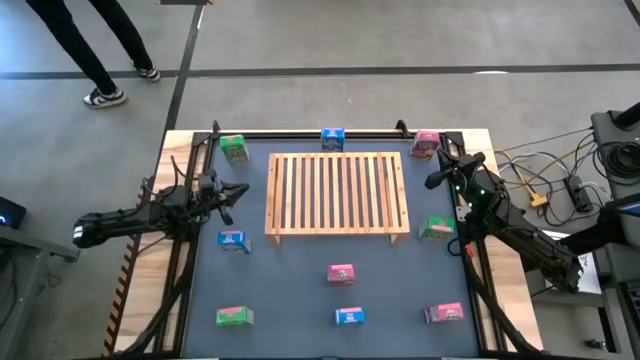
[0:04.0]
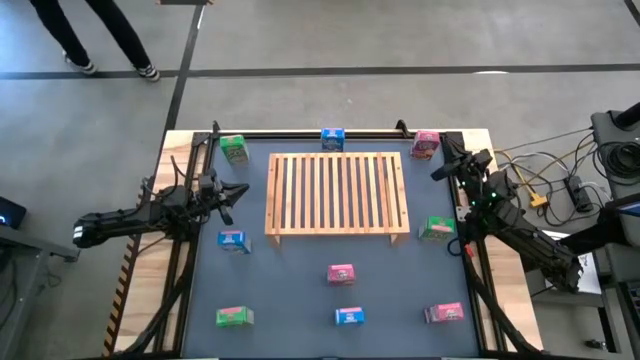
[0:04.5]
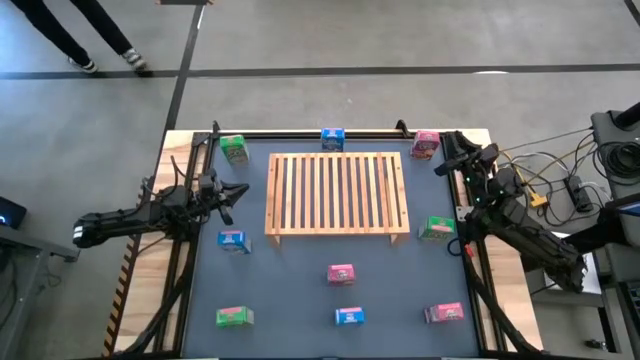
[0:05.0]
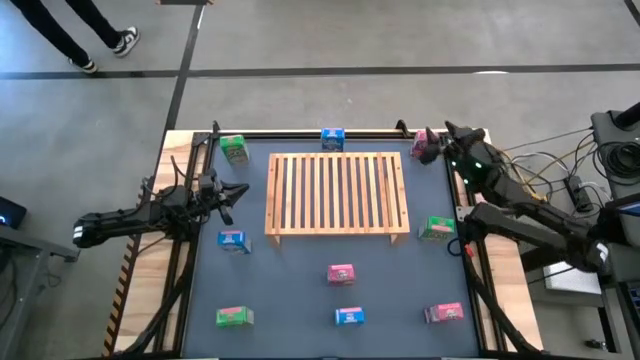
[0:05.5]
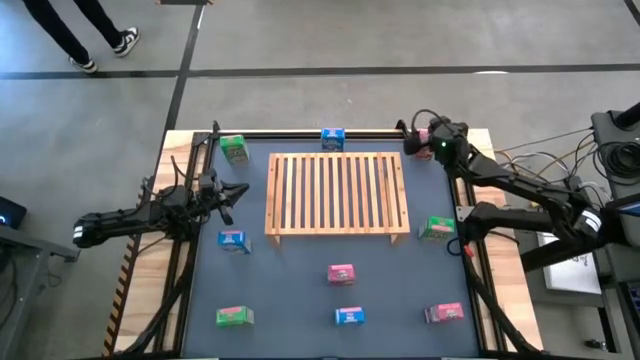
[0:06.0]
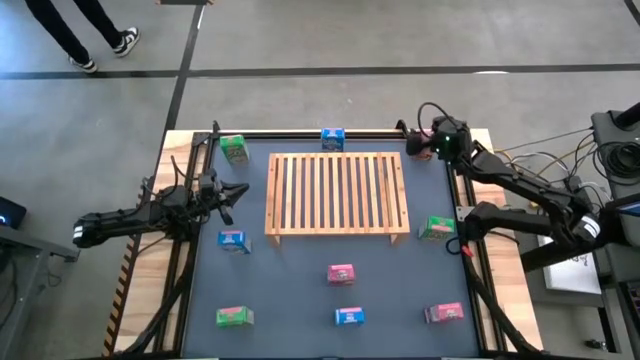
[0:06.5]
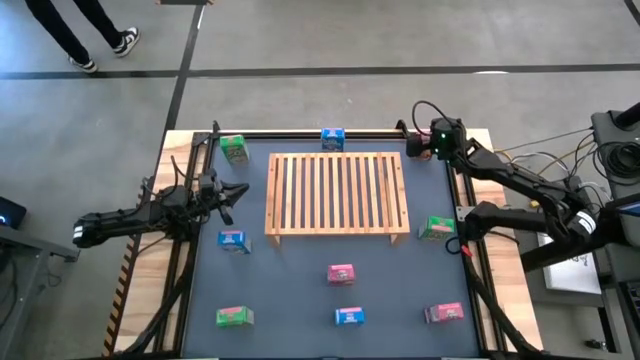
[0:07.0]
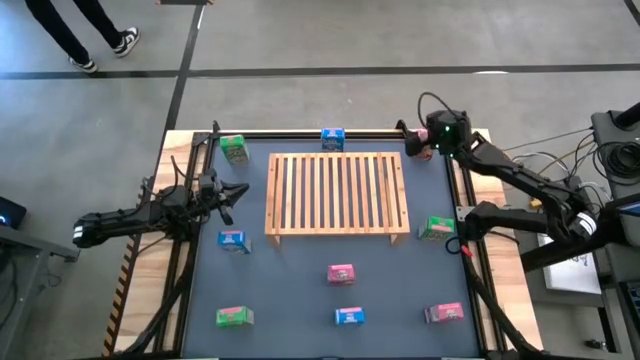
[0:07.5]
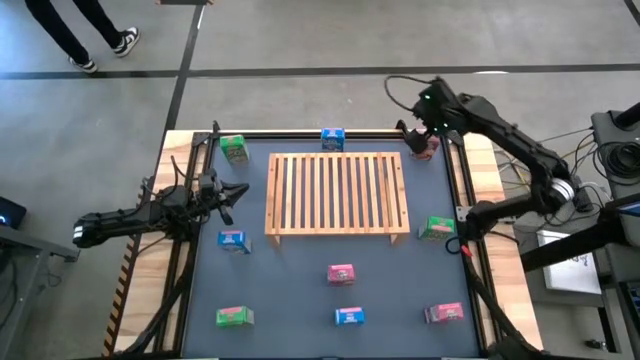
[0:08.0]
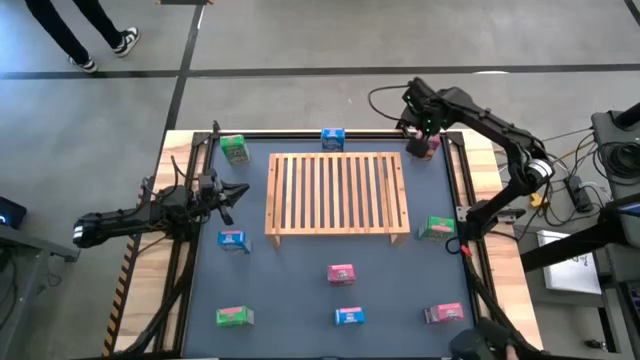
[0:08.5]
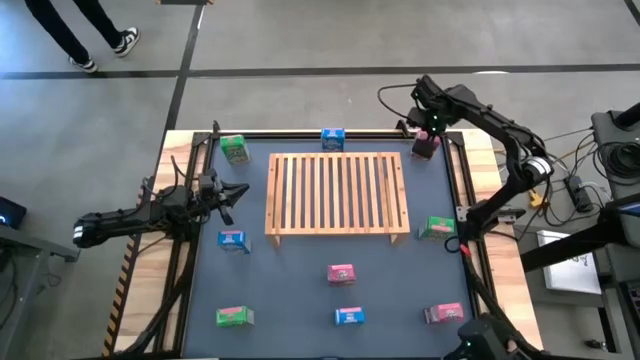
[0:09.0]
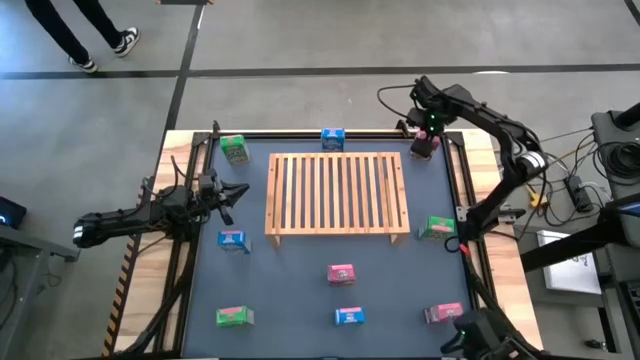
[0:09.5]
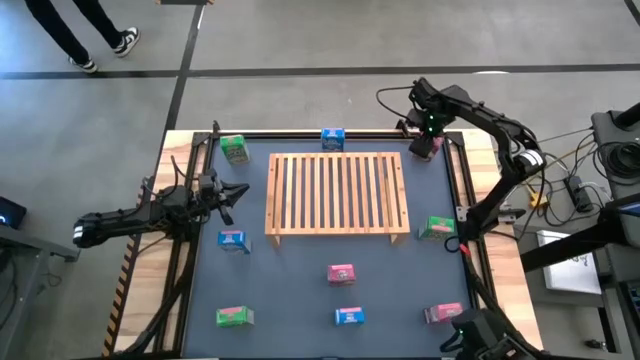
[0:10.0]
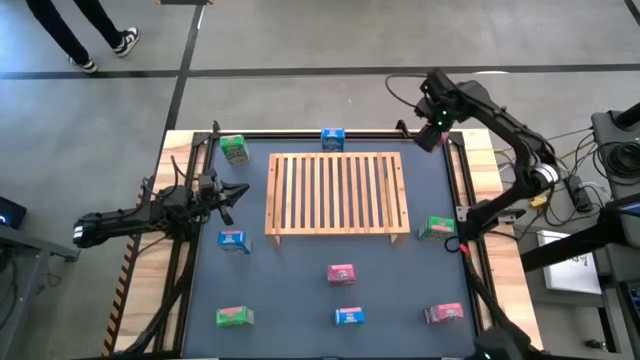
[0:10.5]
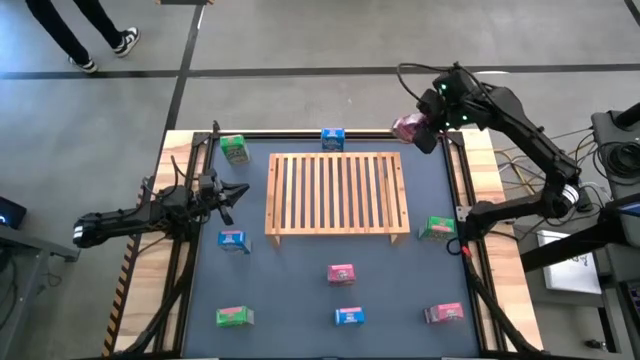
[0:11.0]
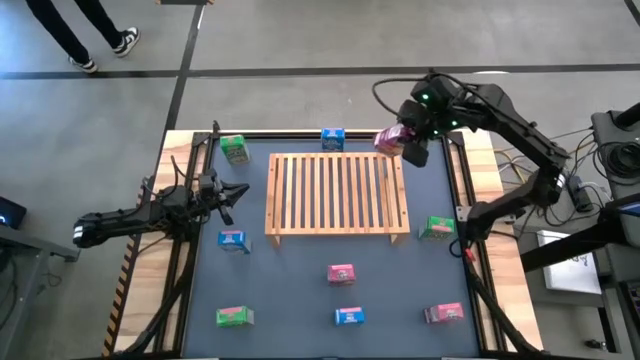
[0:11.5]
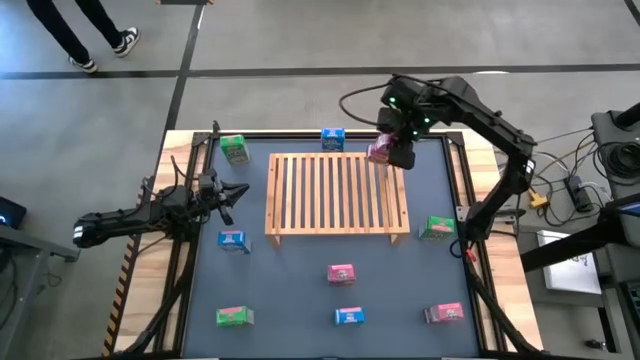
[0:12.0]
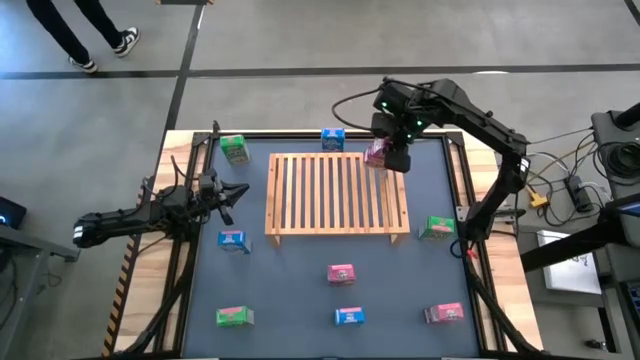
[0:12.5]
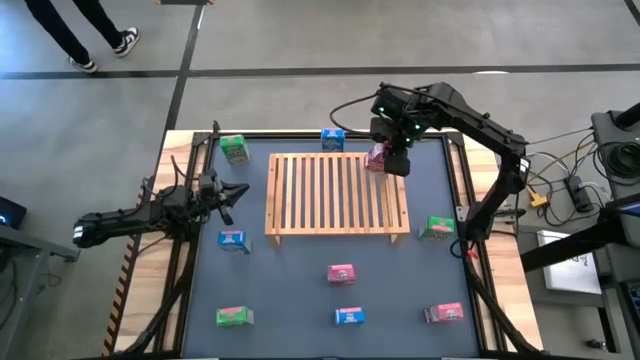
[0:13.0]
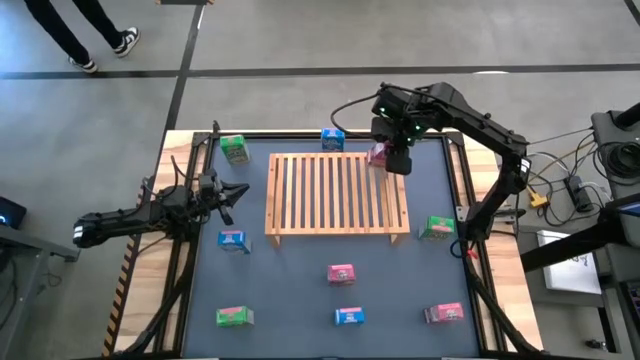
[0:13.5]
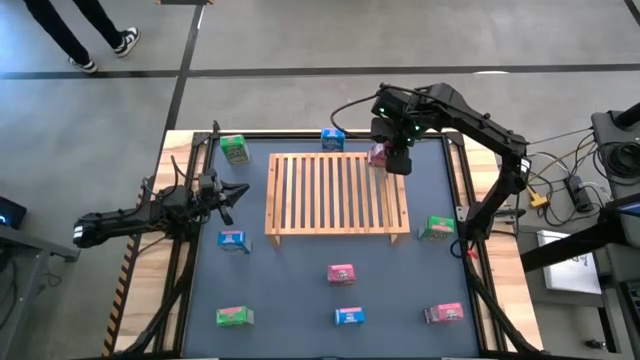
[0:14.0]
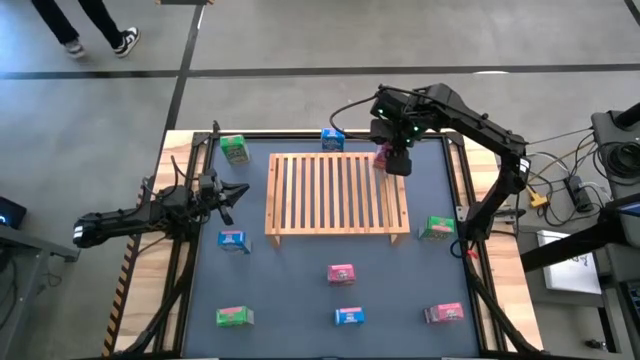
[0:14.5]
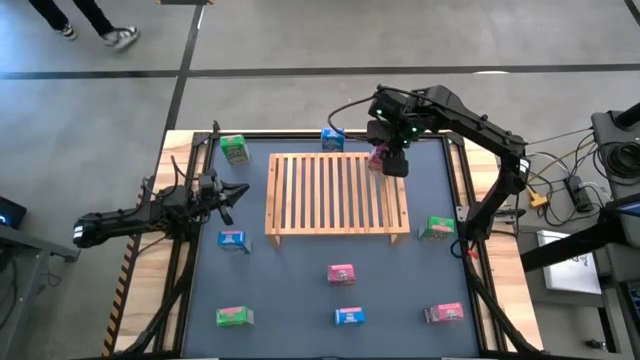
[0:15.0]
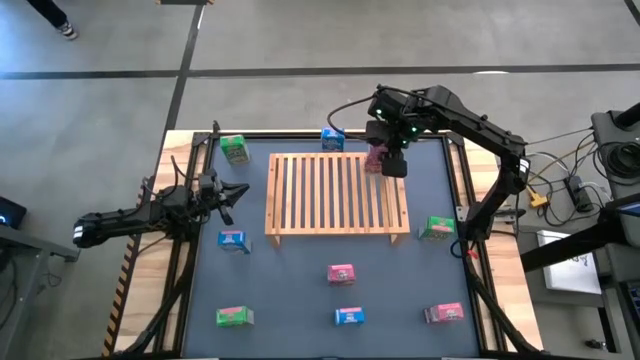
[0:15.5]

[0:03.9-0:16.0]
Task: Stack cereal on shelf
Put the top pink cereal box on the shelf

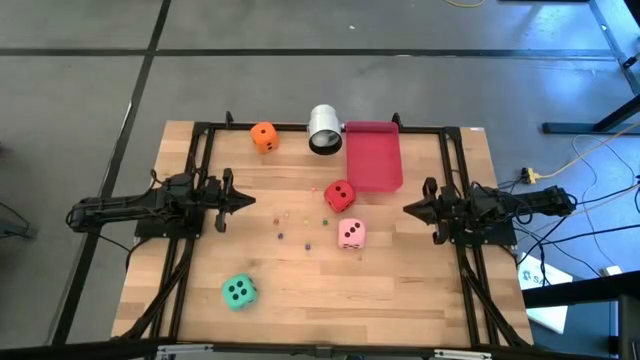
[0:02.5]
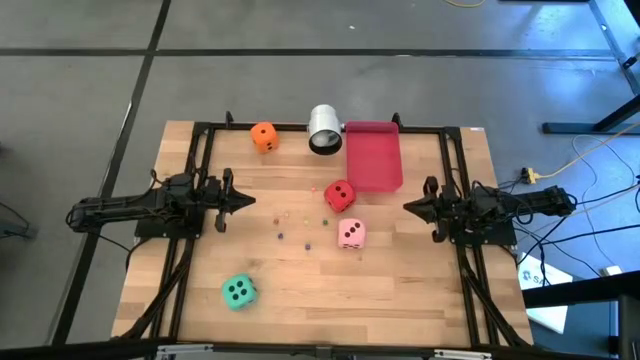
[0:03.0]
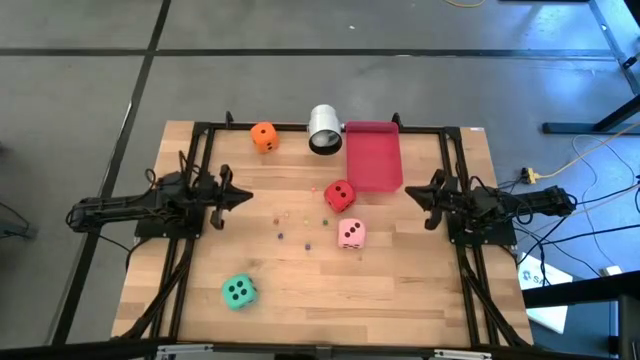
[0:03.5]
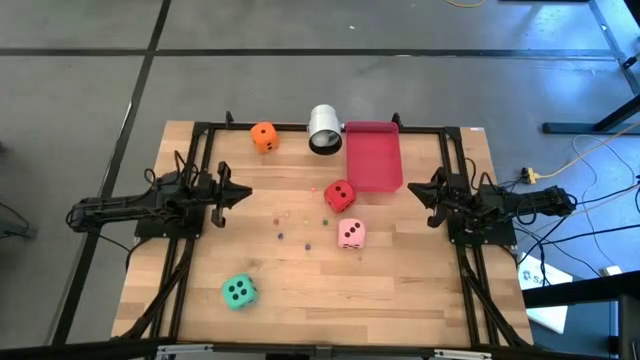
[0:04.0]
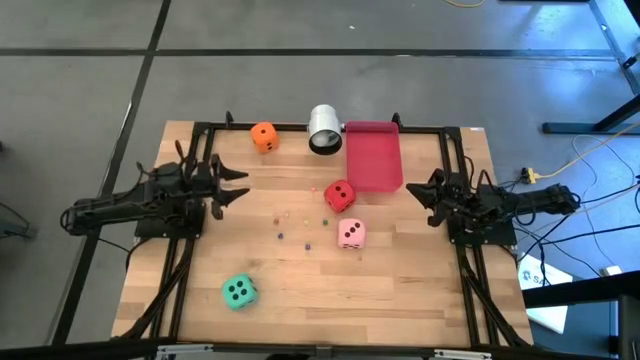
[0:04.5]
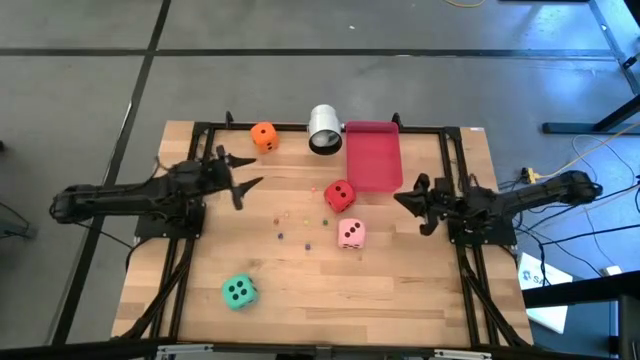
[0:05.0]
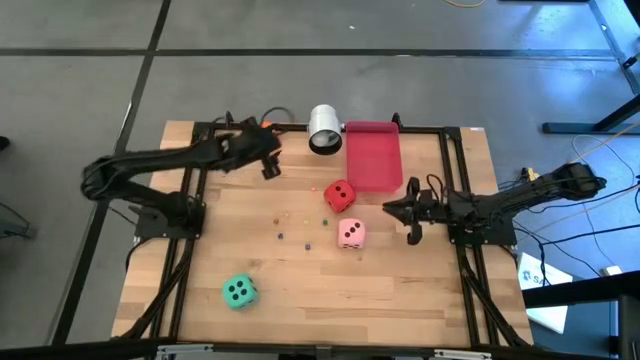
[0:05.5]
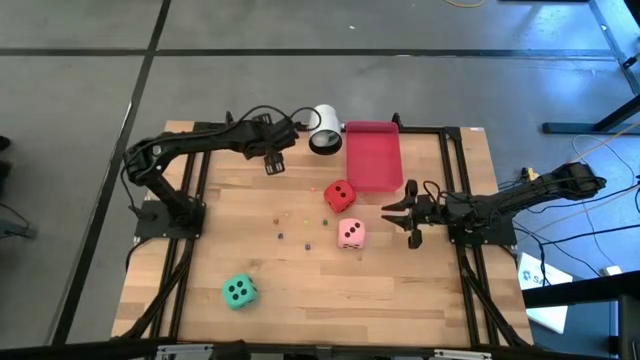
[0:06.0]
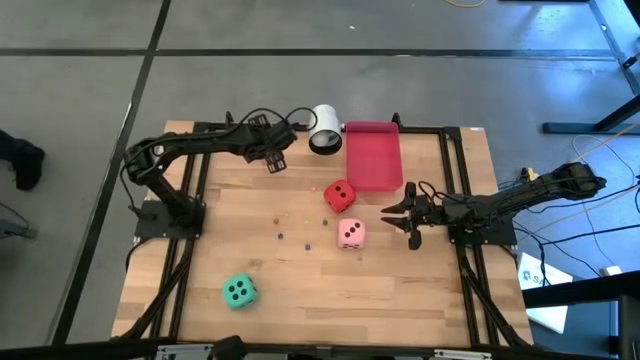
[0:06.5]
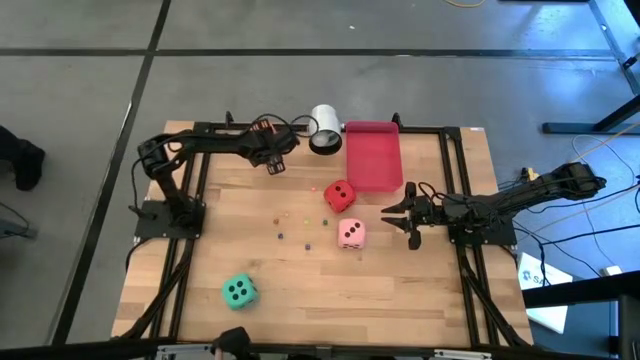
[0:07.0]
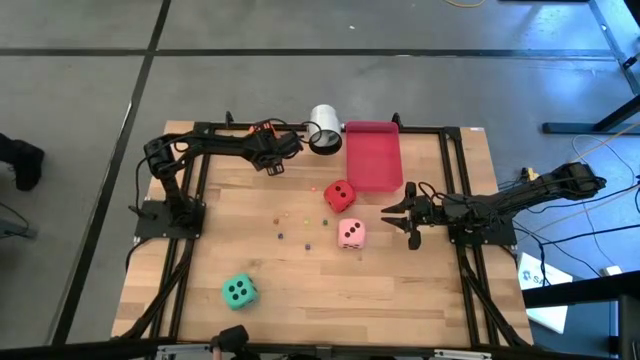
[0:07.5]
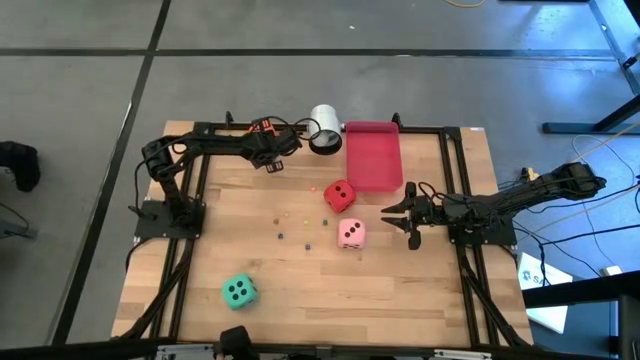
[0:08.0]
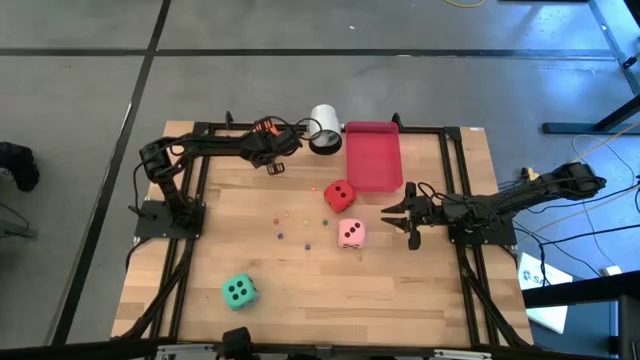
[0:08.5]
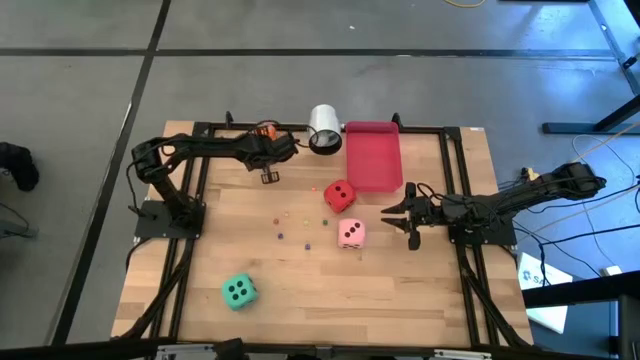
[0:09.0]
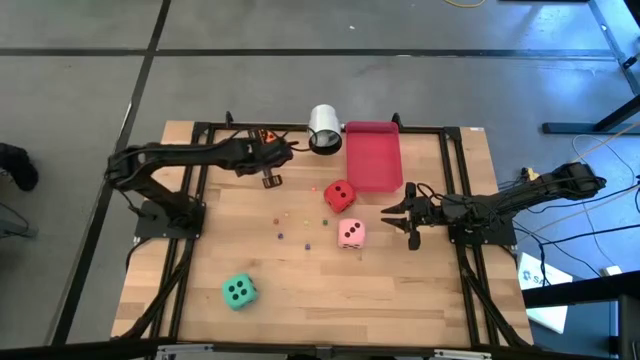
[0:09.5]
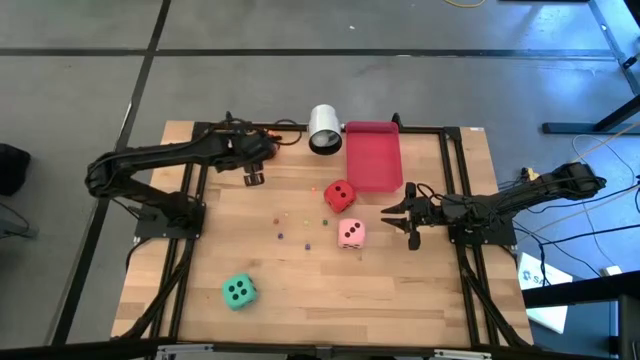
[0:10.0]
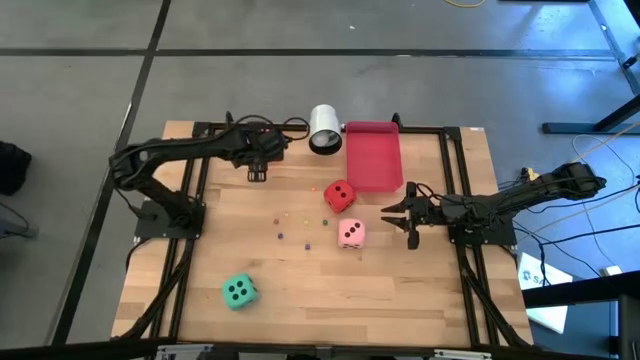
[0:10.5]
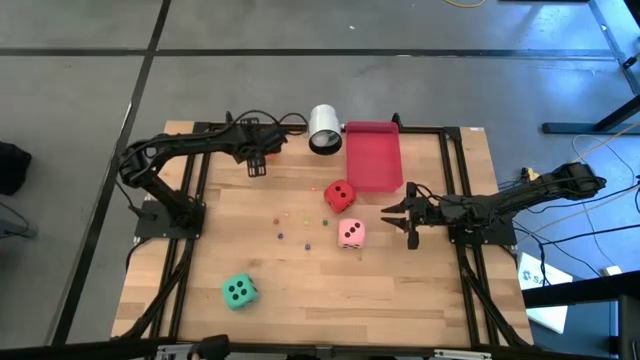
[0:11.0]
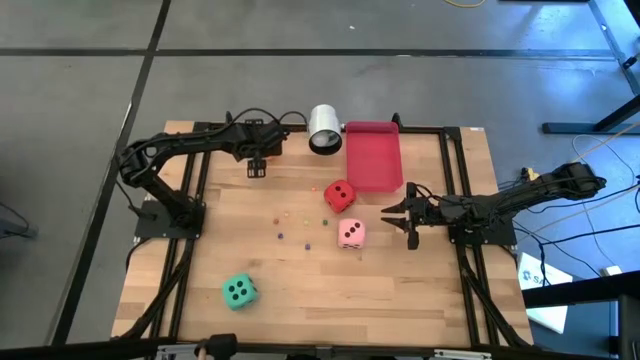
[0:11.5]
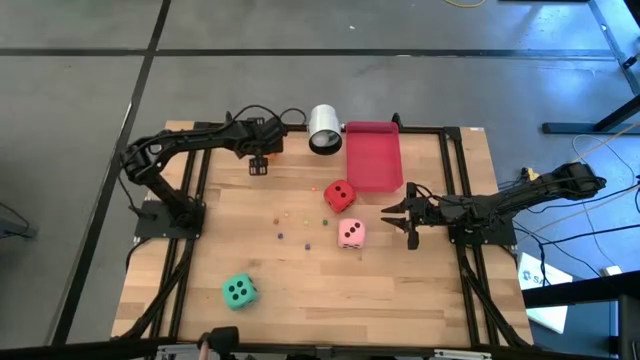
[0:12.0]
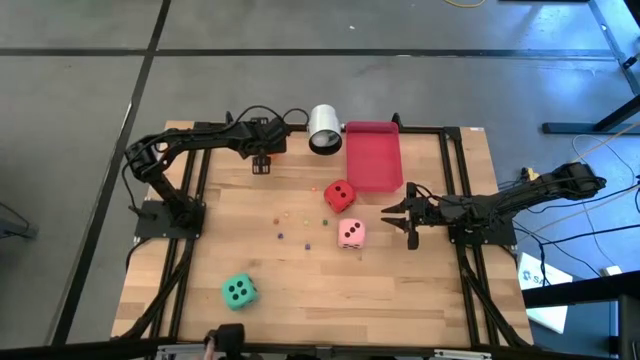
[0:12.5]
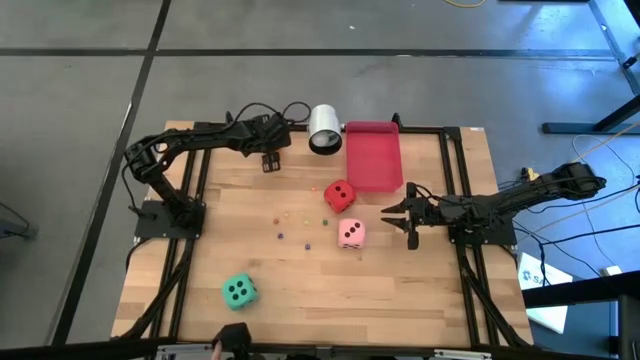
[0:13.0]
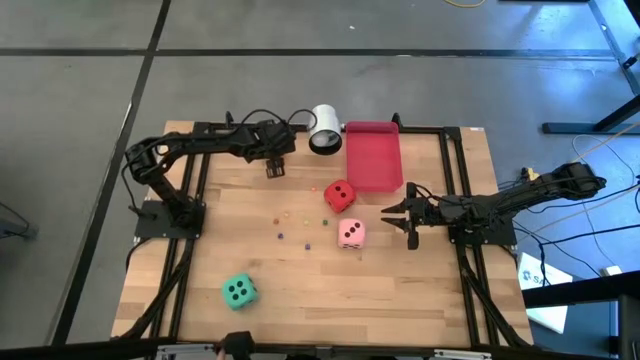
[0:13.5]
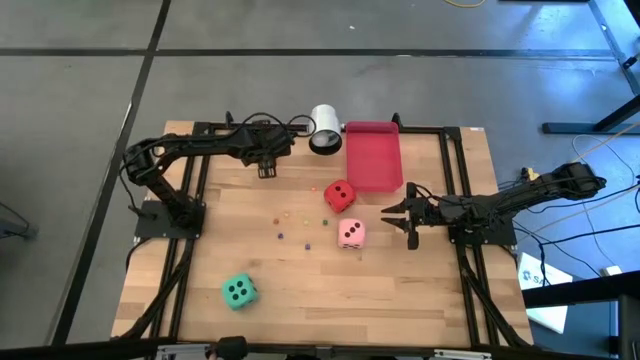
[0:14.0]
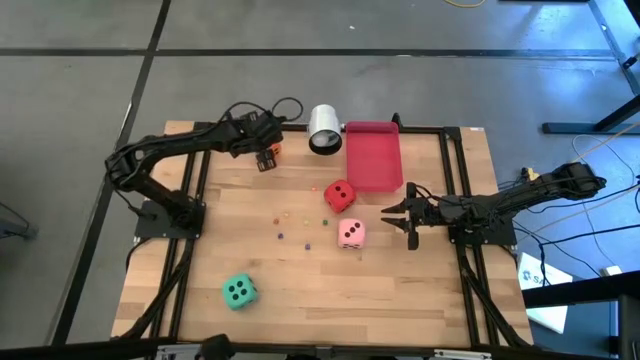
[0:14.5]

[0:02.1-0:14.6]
Task: Pick & Place Dice
Put the big orange dice into the red bin
